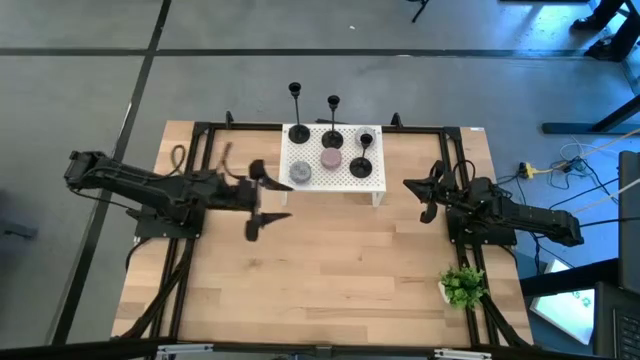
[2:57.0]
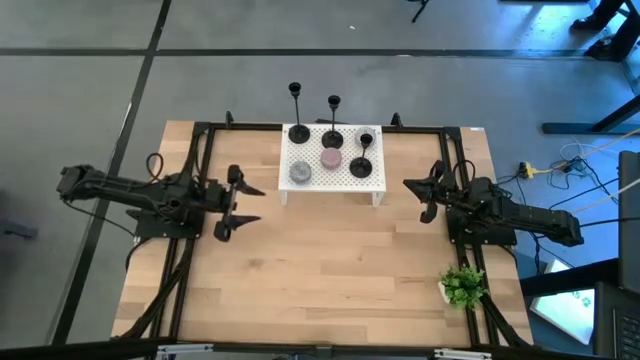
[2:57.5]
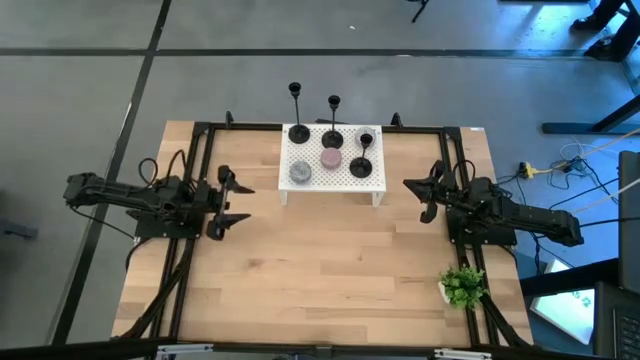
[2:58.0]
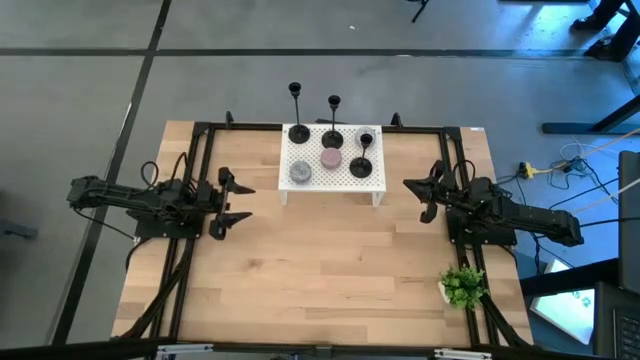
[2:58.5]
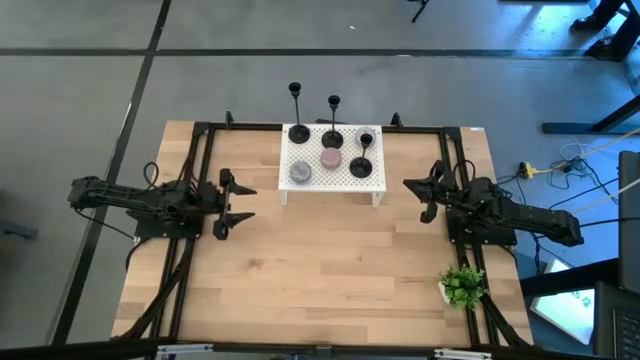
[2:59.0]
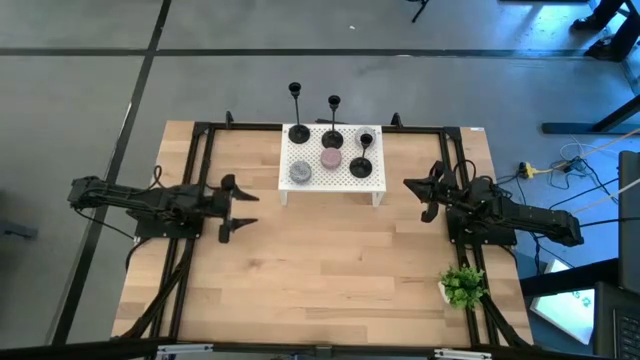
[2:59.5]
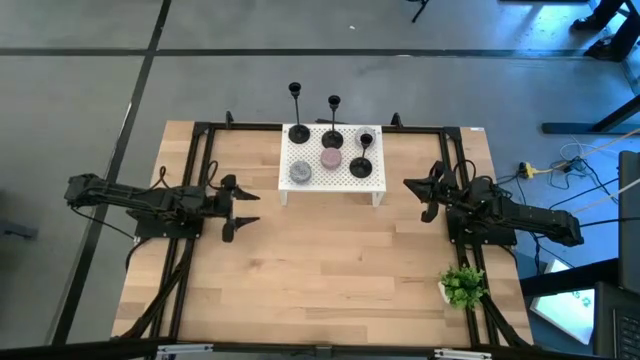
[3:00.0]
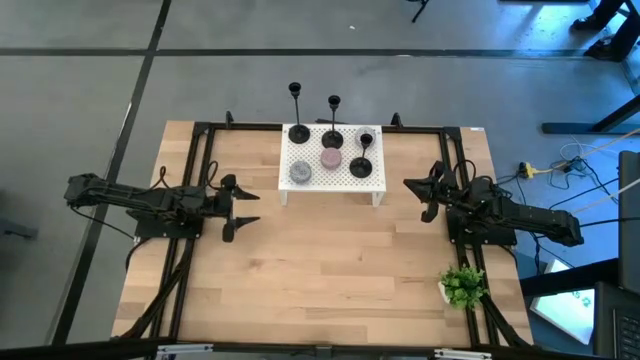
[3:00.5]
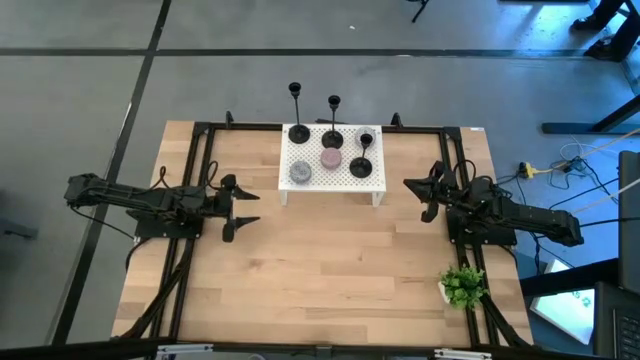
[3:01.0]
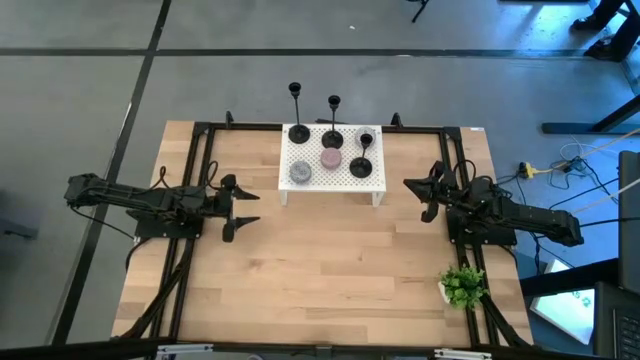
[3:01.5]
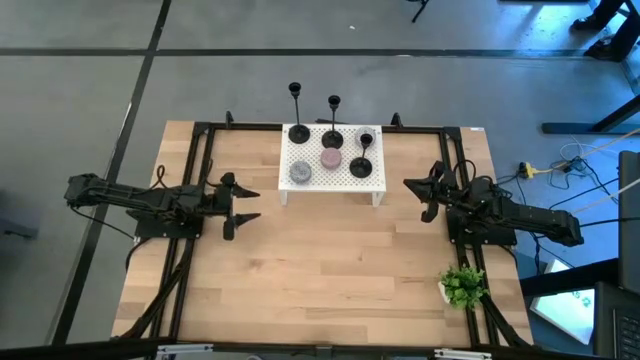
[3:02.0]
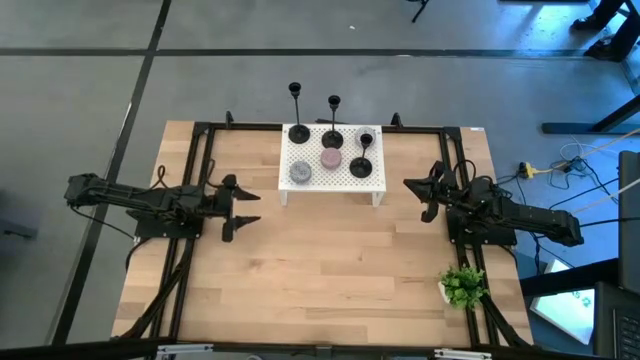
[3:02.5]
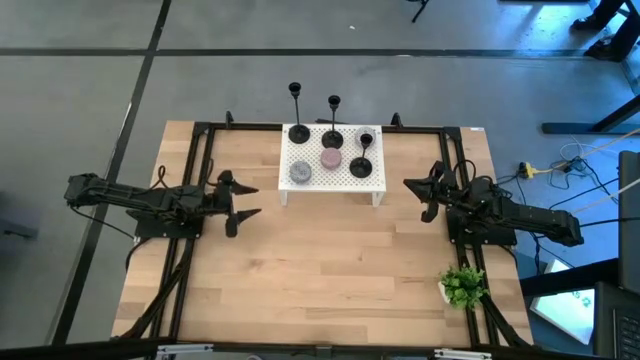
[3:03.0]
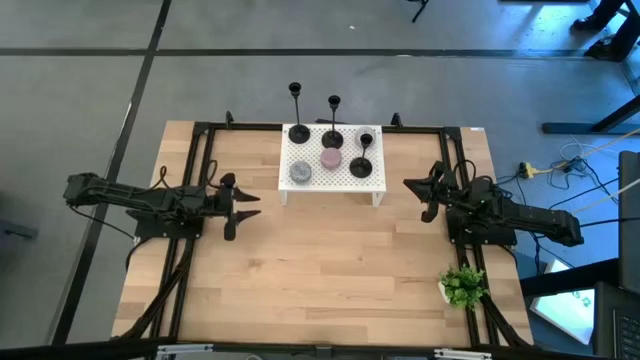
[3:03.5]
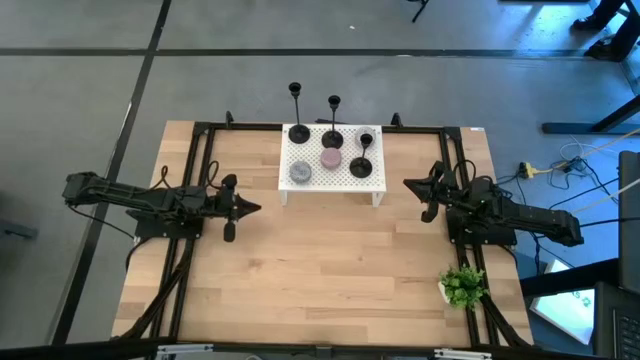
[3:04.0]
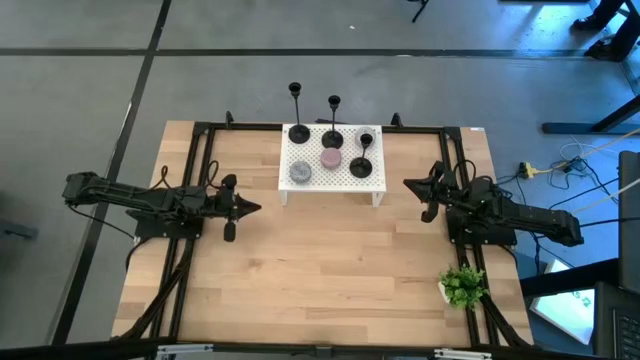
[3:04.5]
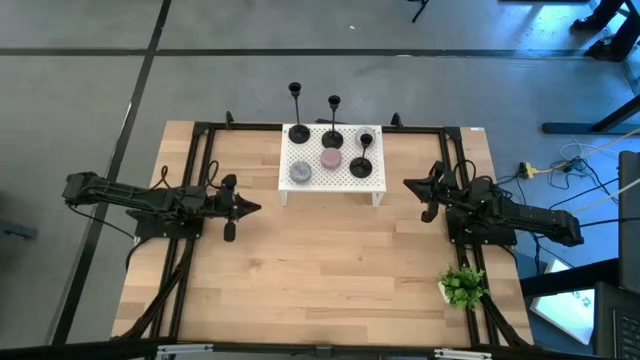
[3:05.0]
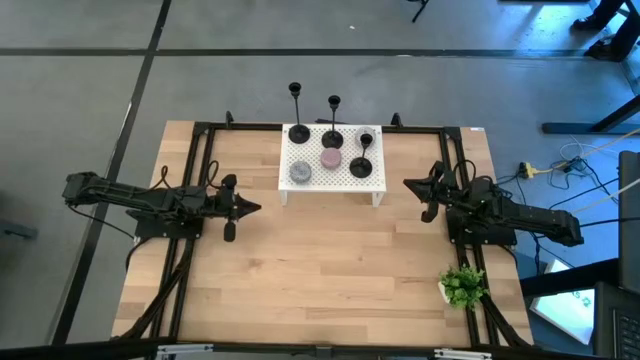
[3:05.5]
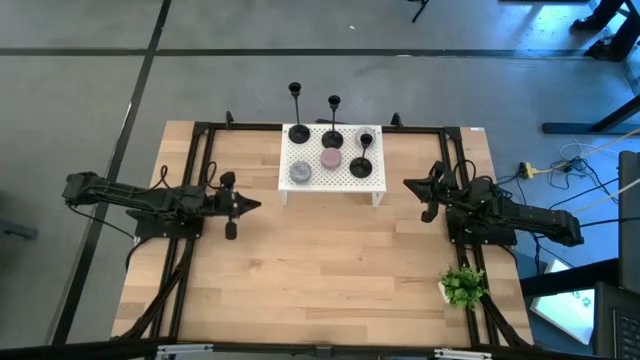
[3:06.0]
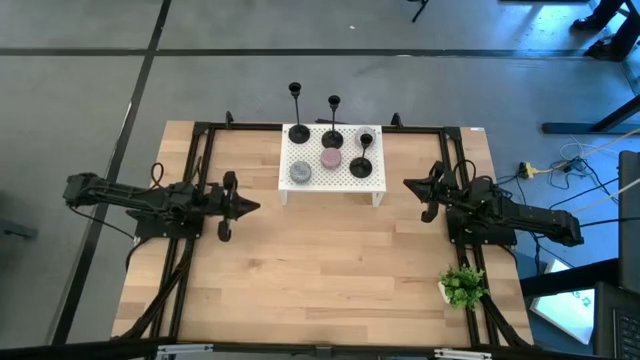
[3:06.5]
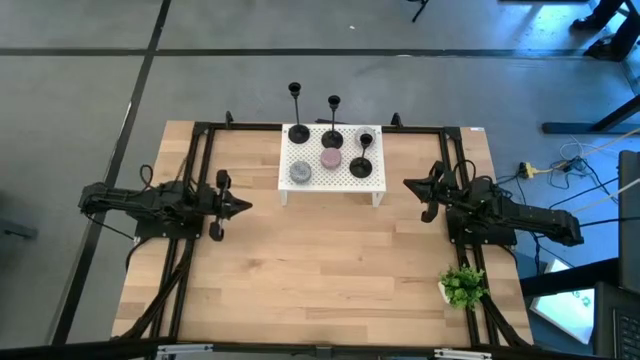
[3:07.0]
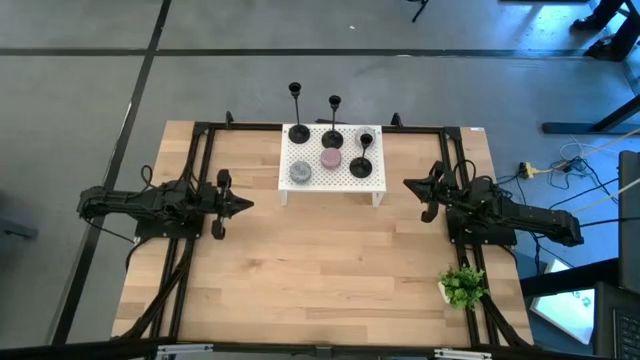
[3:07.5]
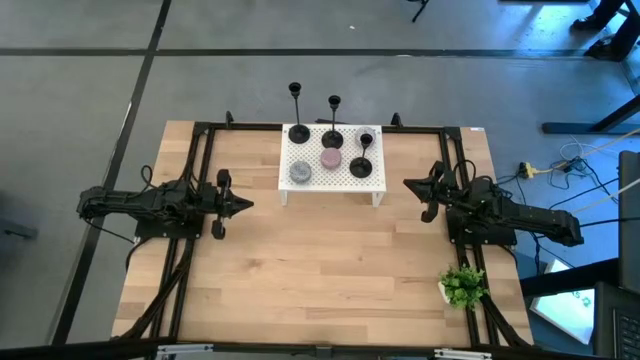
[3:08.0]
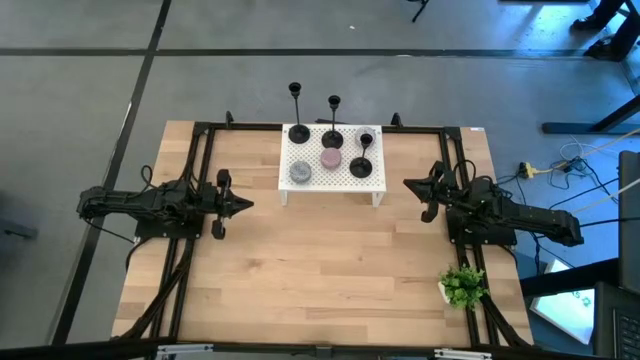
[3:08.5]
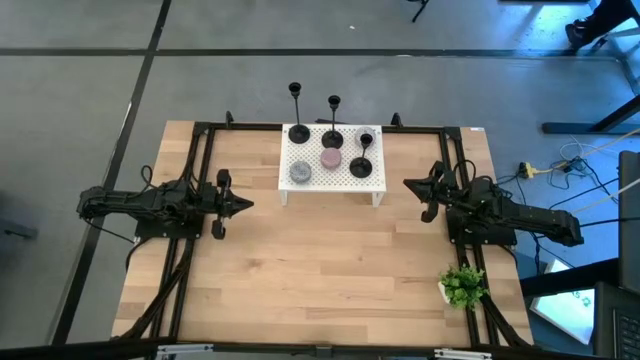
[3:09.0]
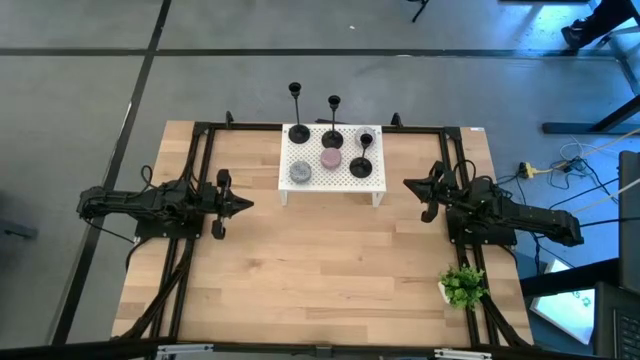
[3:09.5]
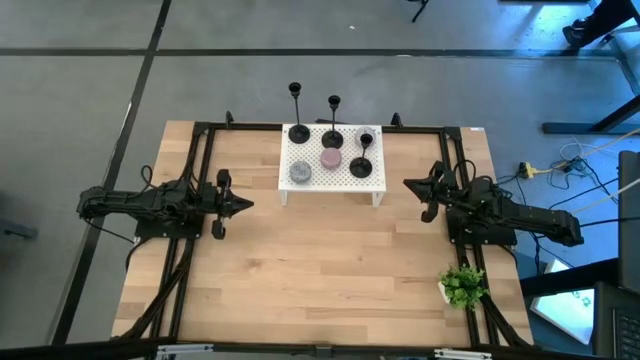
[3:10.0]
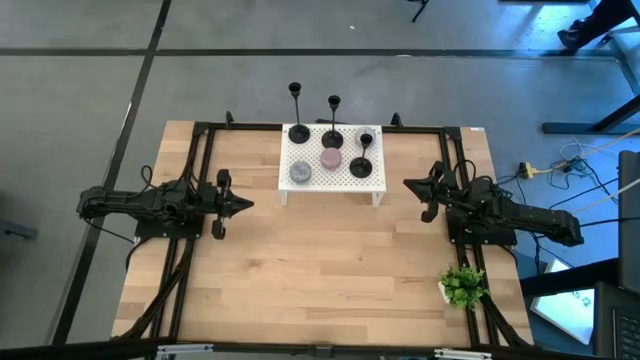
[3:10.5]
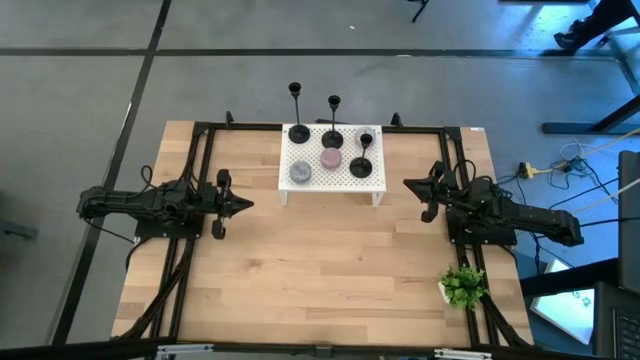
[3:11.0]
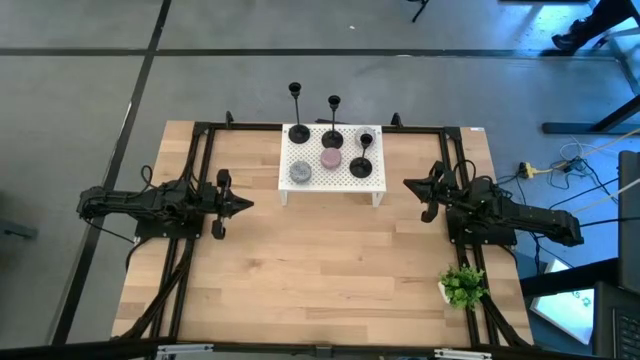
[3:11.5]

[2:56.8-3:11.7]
Task: Pick & Place candle stick holders
Return to Home Position

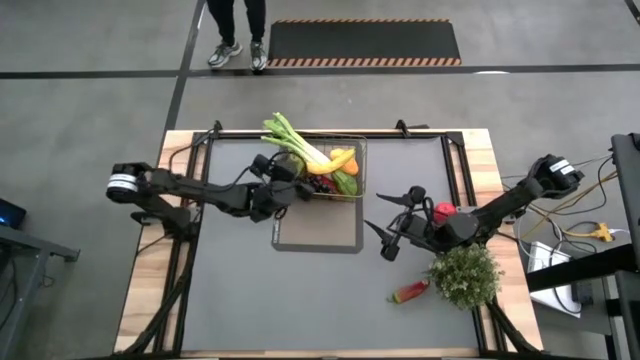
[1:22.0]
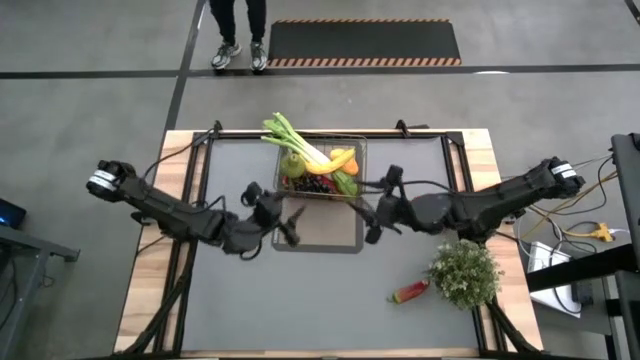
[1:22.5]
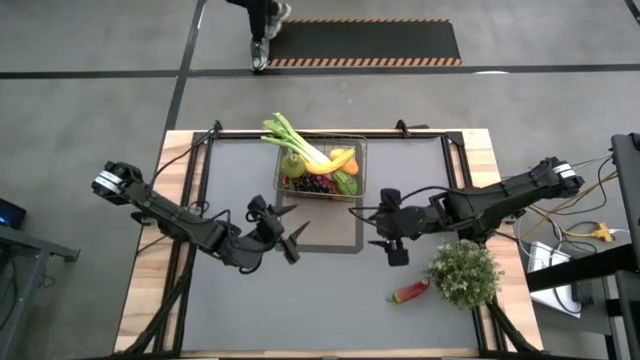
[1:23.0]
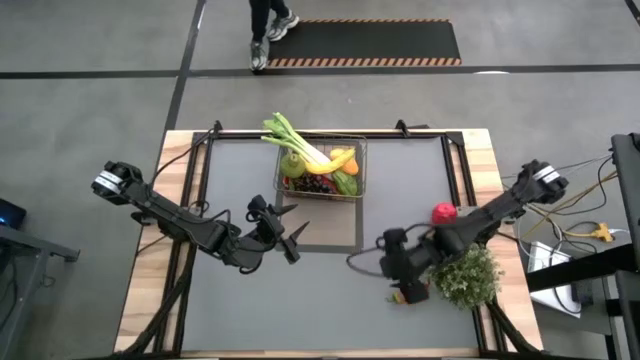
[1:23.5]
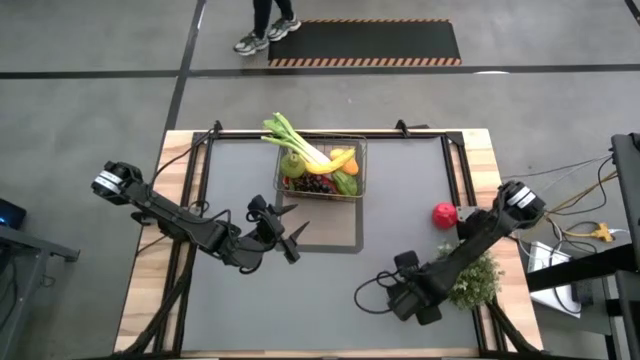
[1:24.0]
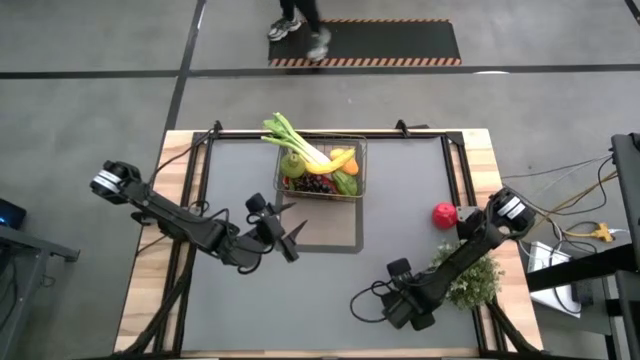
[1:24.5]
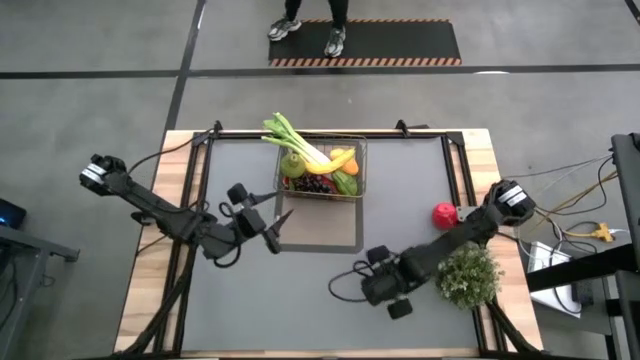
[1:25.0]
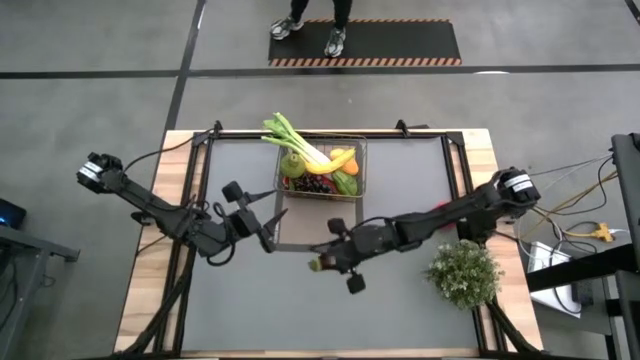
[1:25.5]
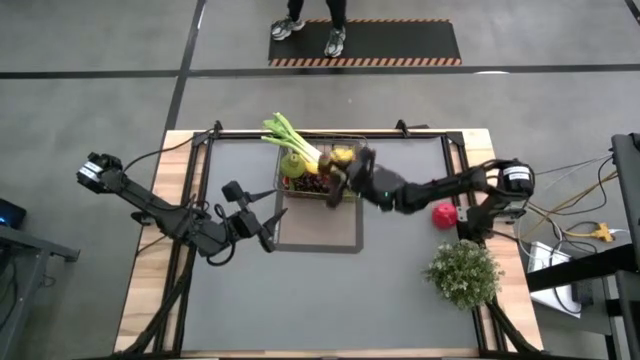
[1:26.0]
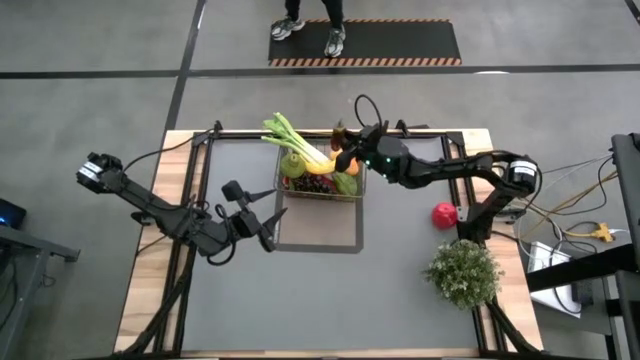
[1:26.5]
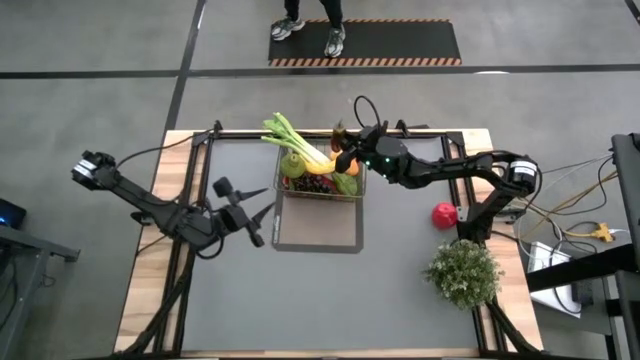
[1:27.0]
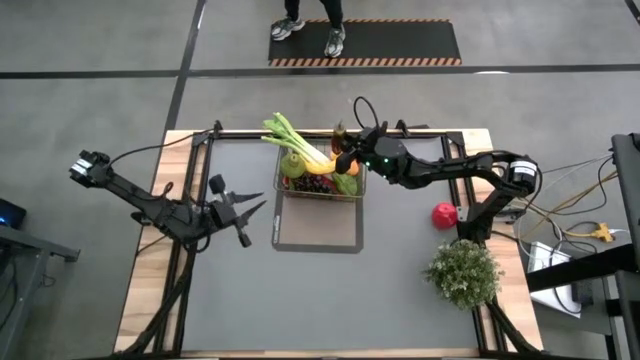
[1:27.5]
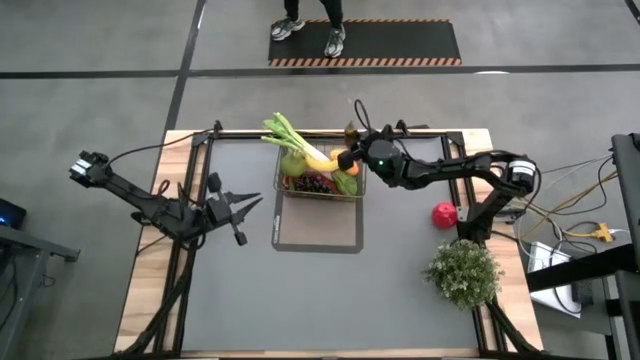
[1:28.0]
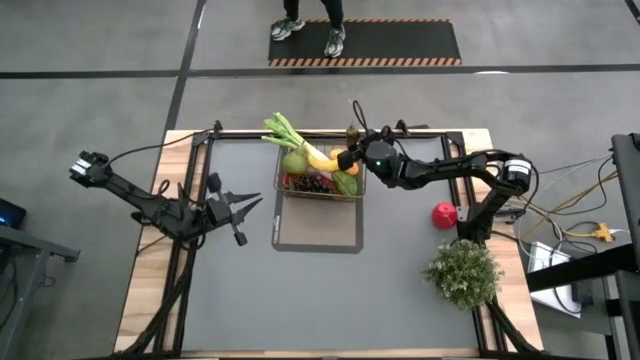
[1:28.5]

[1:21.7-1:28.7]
Task: Build produce basket
Put the red chili pepper into the wire basket
